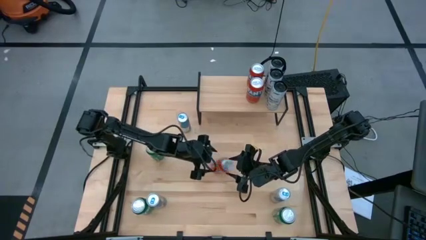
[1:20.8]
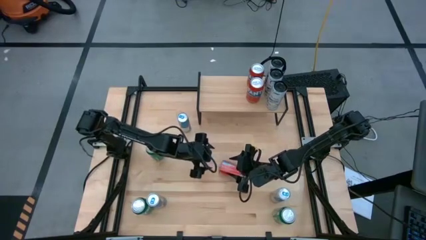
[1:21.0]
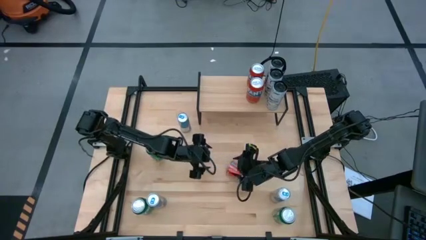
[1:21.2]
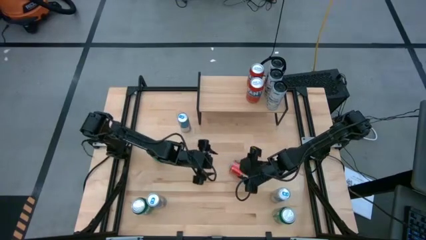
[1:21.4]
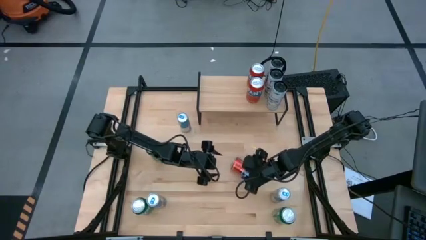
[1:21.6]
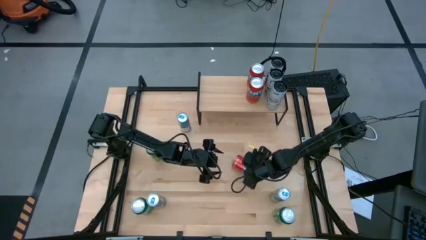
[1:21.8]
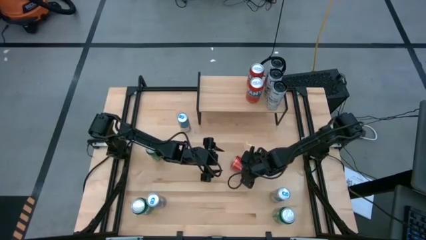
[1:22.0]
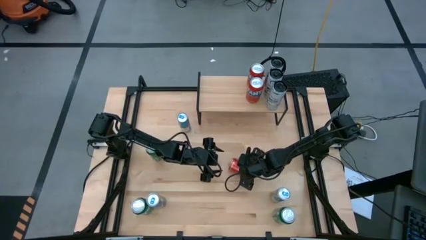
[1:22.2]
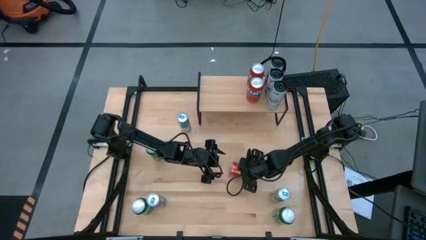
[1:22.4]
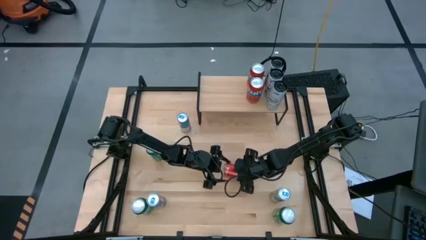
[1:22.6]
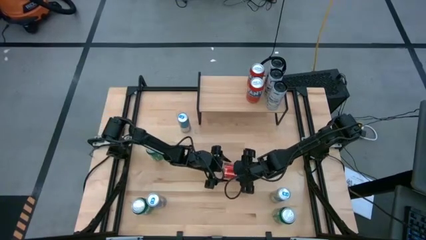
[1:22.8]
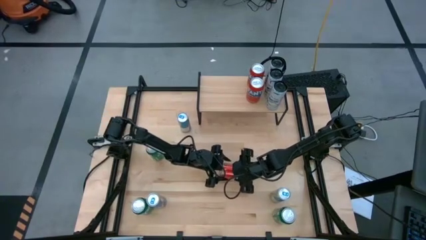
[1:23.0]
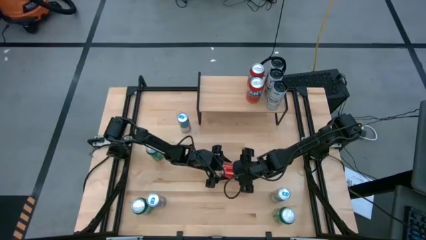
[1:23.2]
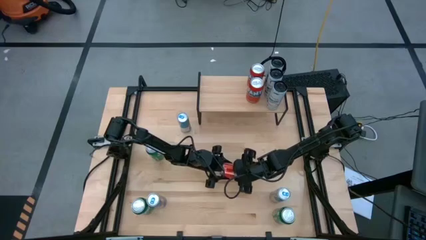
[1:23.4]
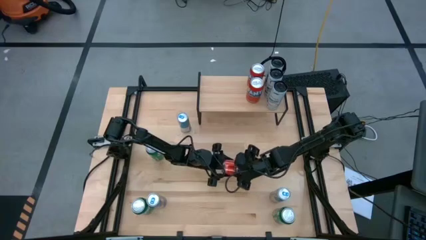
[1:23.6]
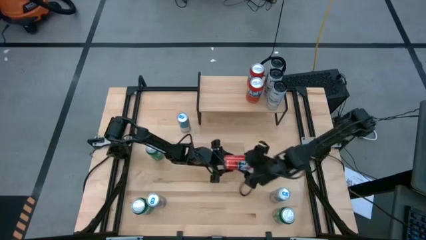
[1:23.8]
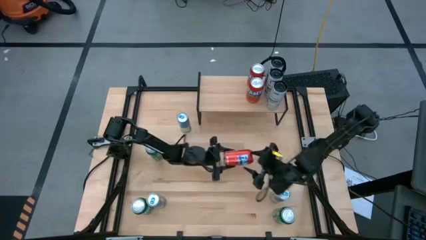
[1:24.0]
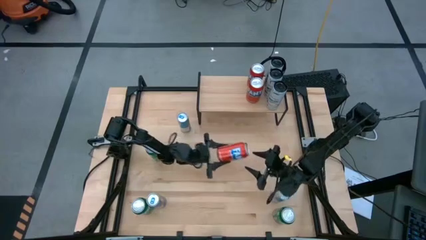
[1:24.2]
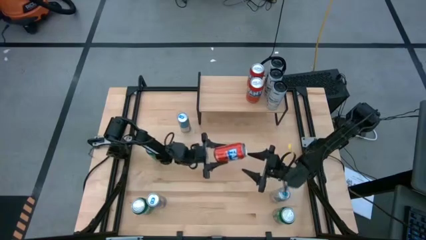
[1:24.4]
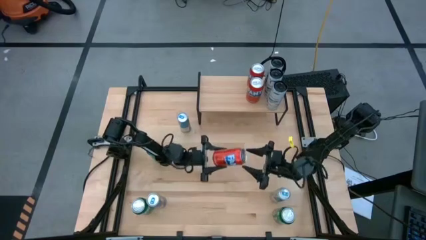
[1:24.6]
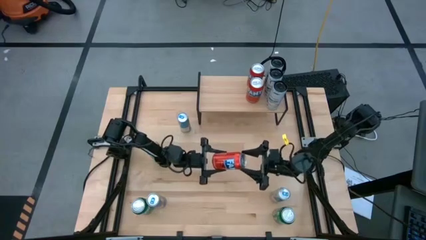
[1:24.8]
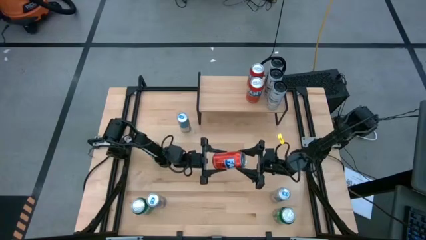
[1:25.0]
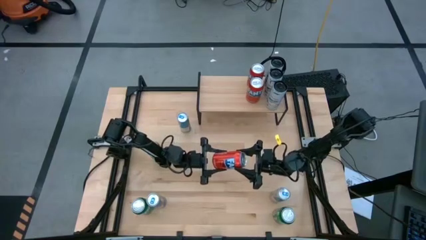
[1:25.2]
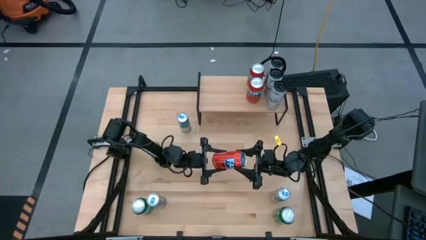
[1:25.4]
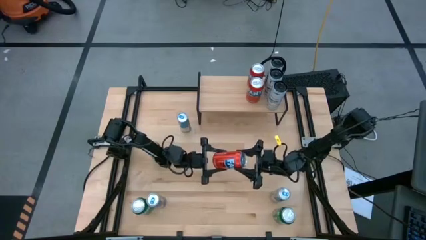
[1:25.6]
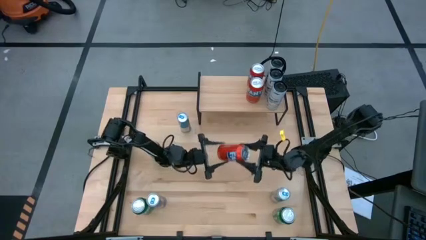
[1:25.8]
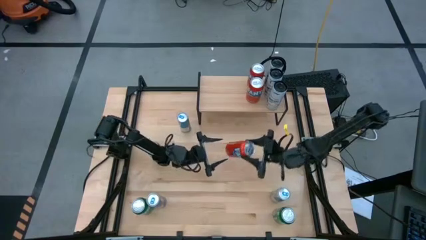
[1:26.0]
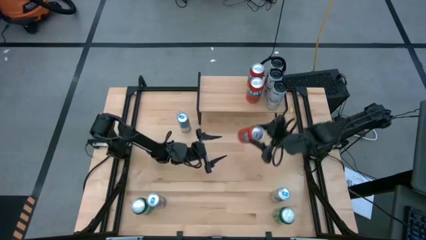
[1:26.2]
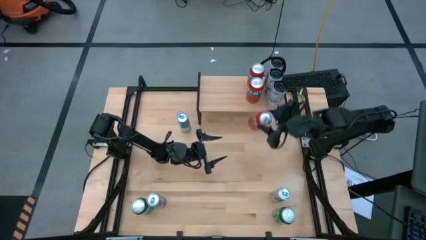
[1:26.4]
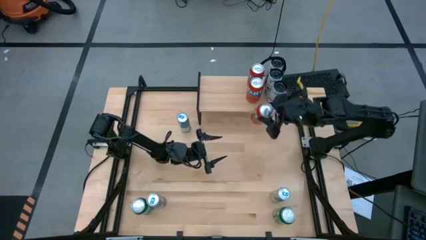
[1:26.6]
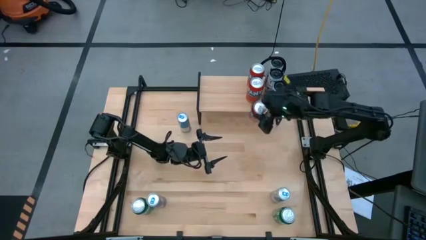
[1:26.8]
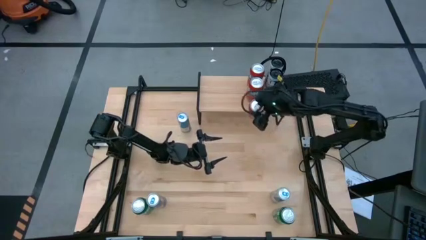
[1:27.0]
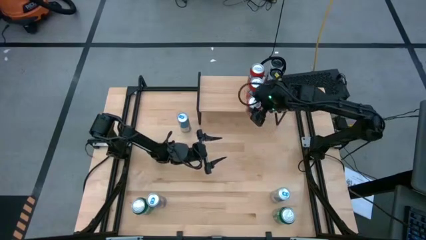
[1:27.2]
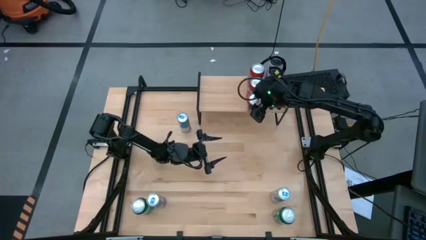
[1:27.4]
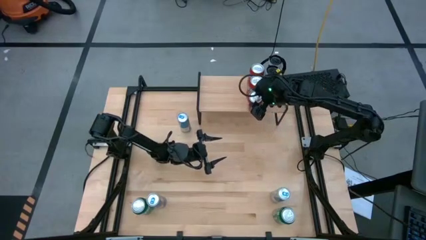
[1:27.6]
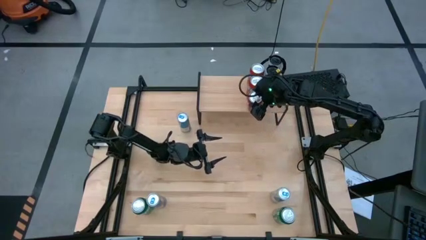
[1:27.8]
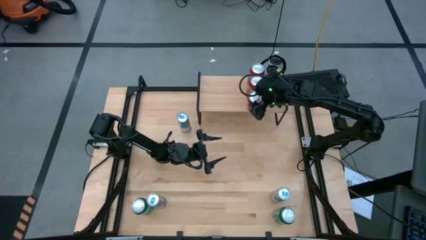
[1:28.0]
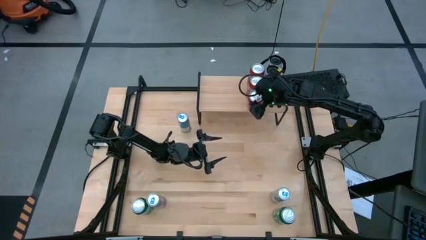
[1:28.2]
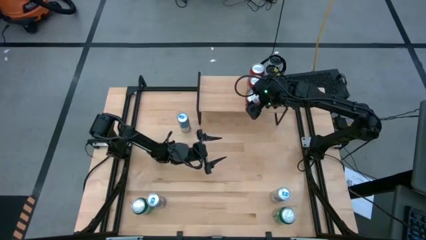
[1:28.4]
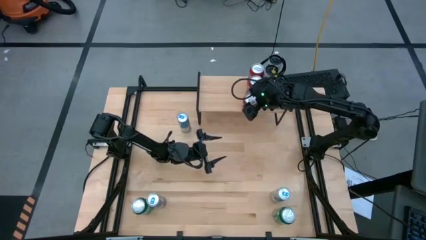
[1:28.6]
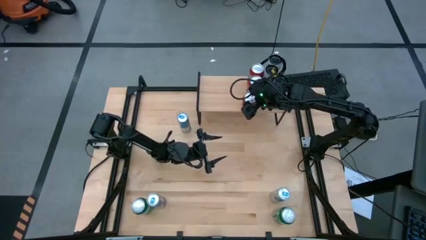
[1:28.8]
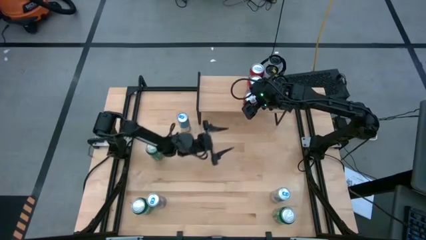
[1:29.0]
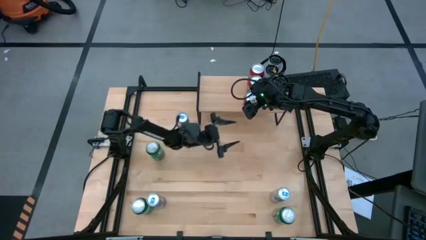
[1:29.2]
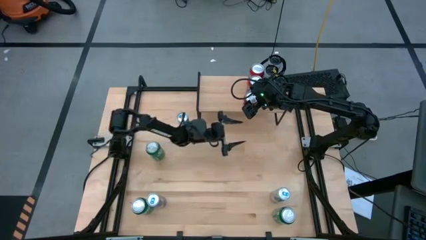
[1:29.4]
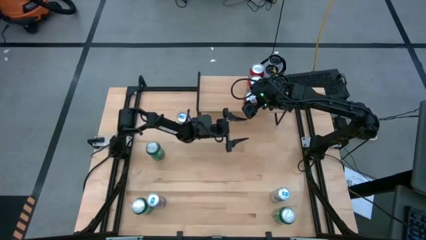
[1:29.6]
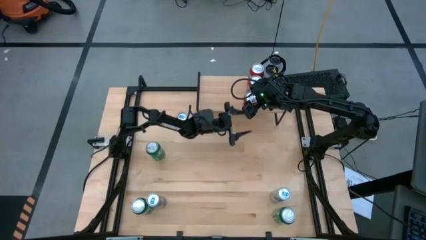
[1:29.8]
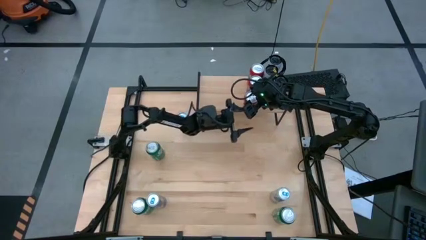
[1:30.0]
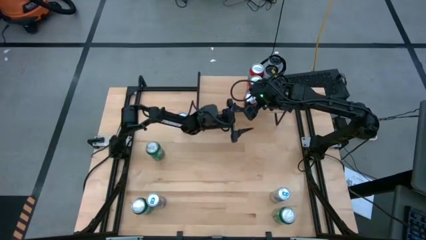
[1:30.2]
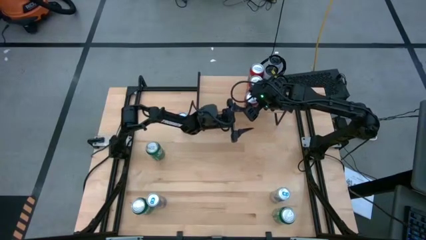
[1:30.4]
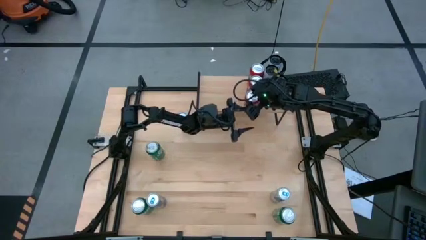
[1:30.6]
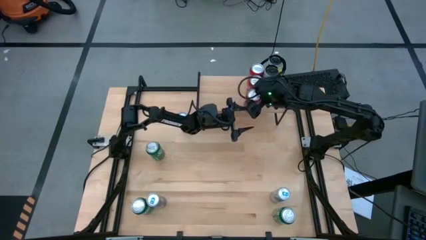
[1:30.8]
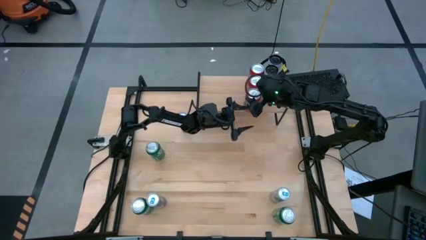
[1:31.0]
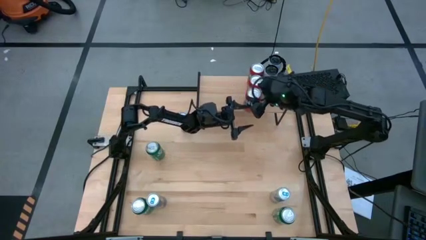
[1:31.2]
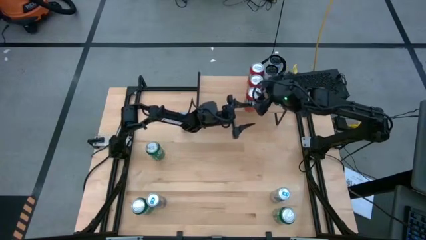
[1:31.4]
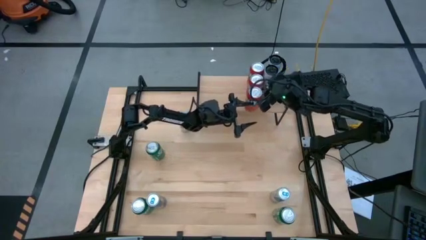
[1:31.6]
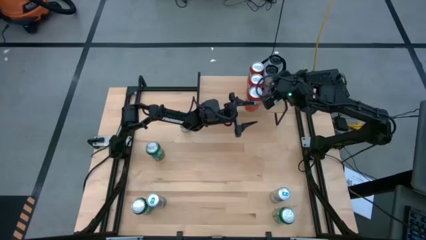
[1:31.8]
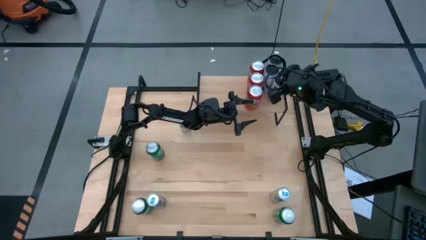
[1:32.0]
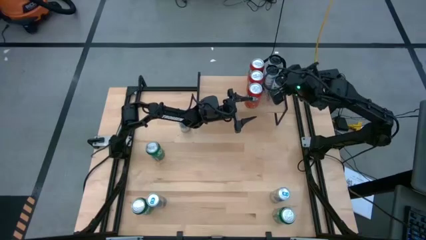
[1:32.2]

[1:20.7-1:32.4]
Task: Place canned beverage on shelf
Put the red soda can on the shelf aligned with the other red soda cans

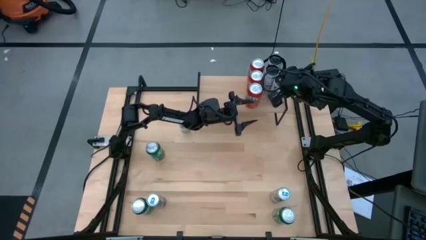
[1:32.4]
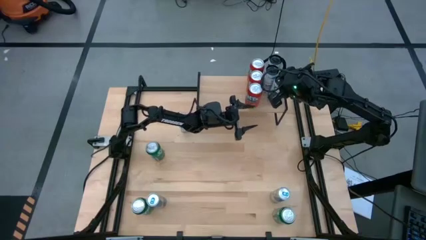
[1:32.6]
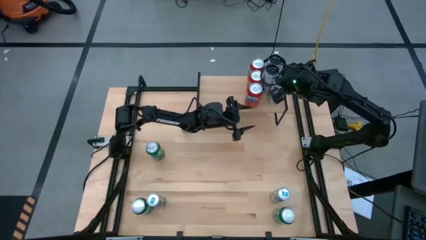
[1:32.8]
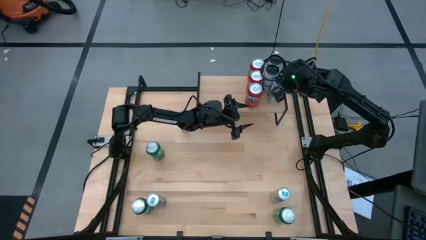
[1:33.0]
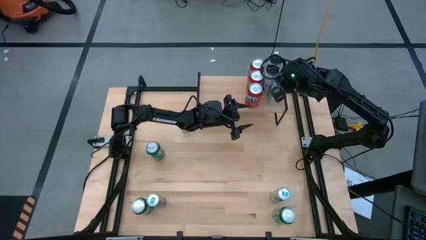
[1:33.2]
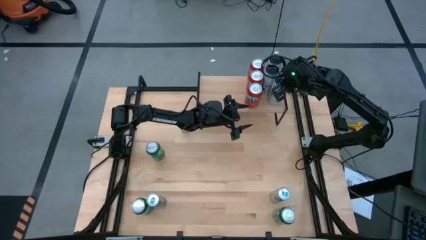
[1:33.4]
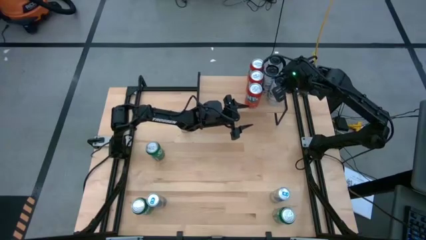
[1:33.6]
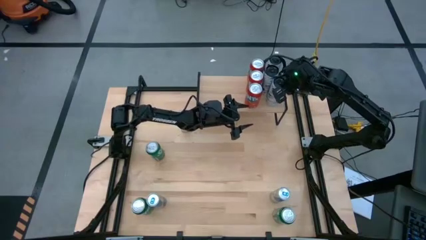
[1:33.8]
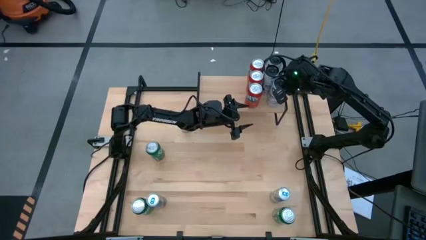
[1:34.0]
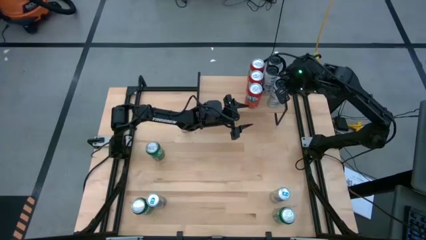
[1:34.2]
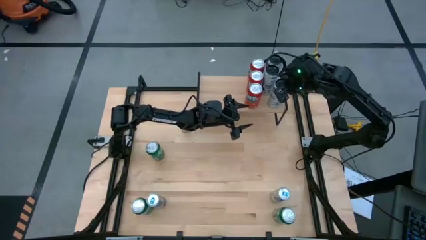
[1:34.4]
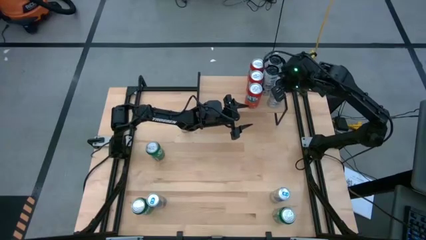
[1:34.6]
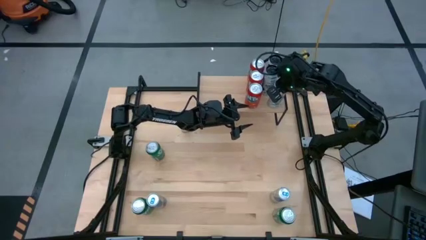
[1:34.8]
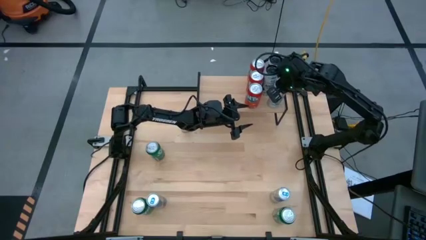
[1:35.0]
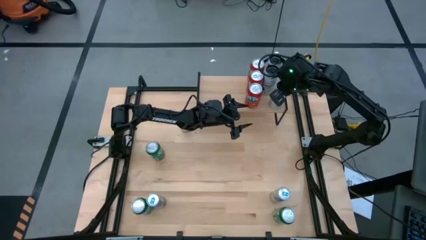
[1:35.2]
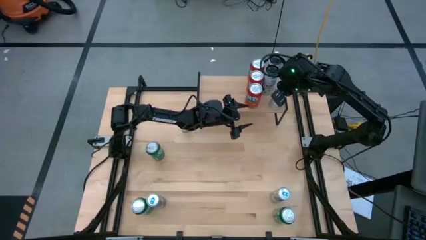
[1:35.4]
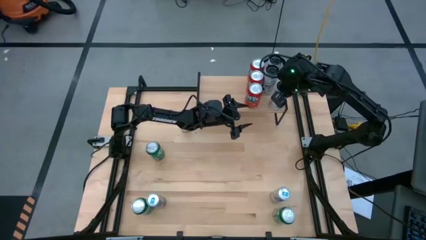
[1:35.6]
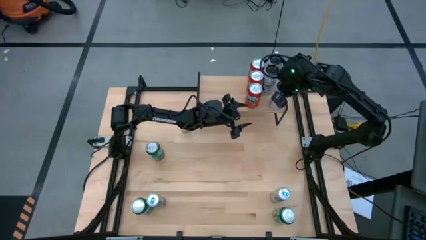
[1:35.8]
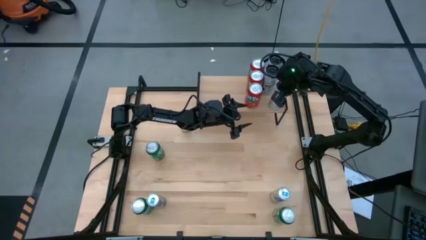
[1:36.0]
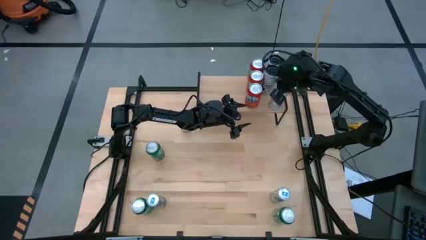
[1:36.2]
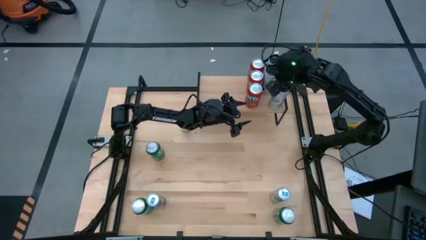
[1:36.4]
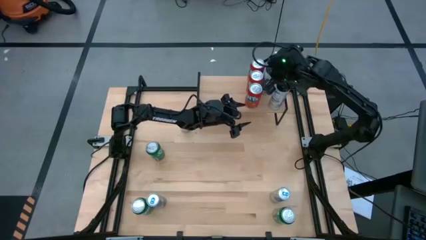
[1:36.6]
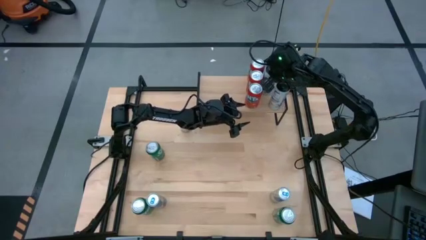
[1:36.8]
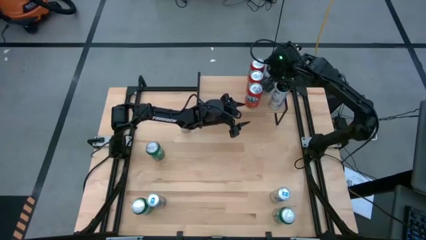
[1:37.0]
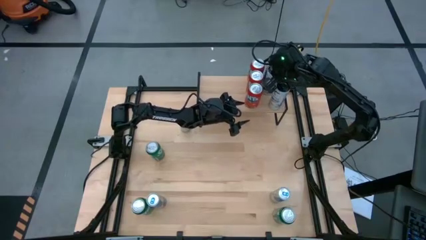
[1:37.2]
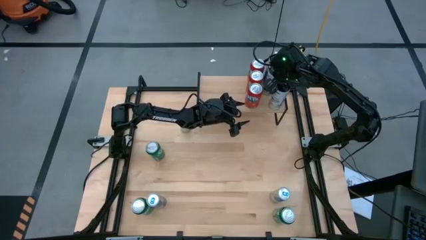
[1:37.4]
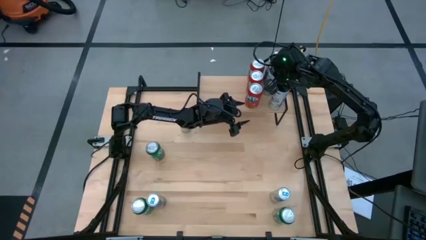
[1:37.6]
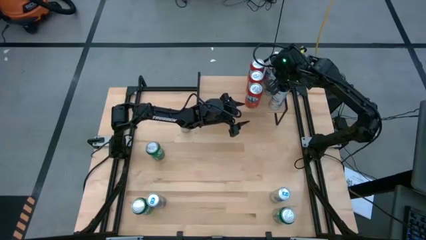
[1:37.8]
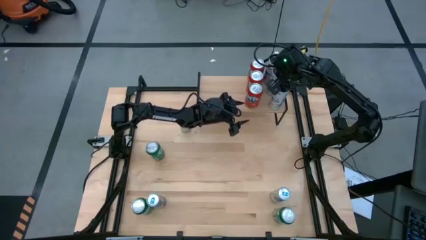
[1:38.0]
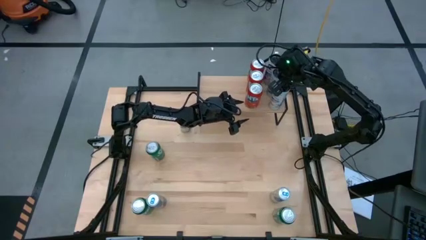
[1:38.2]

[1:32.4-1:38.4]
Adjust the white-blue soda cans on the shelf
